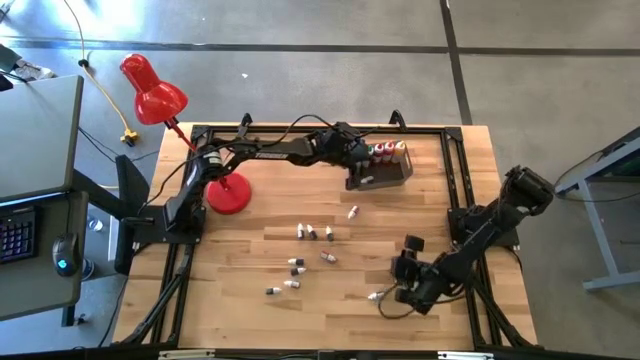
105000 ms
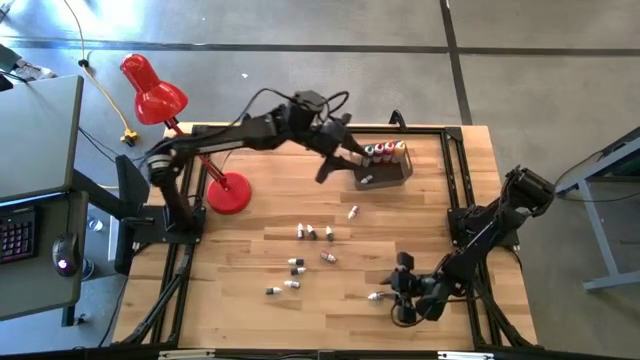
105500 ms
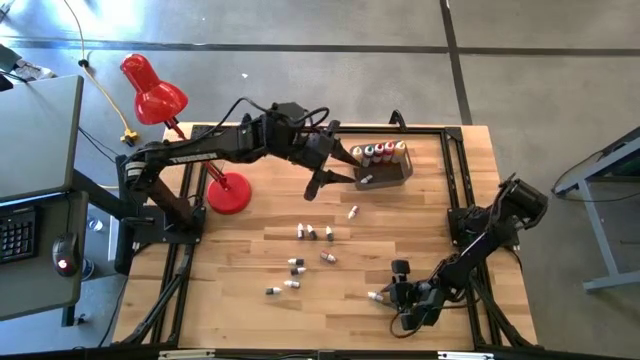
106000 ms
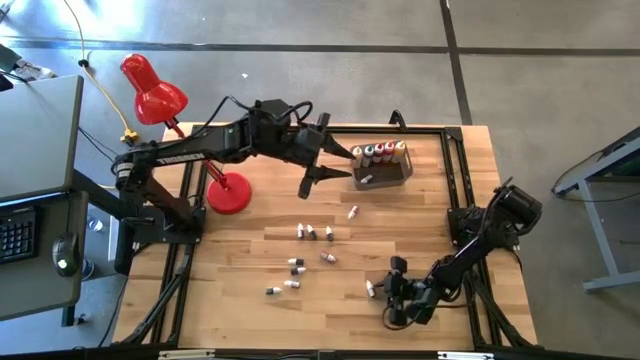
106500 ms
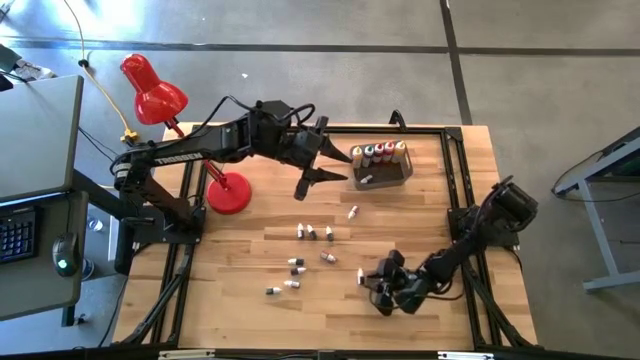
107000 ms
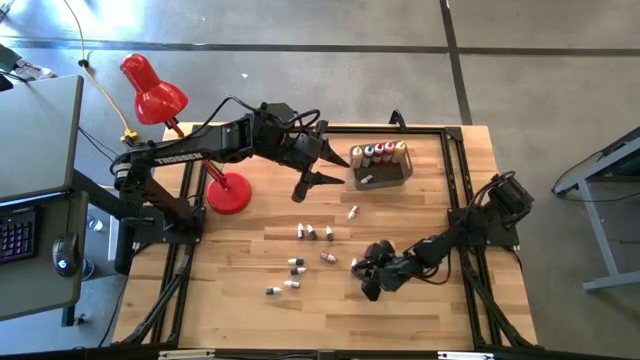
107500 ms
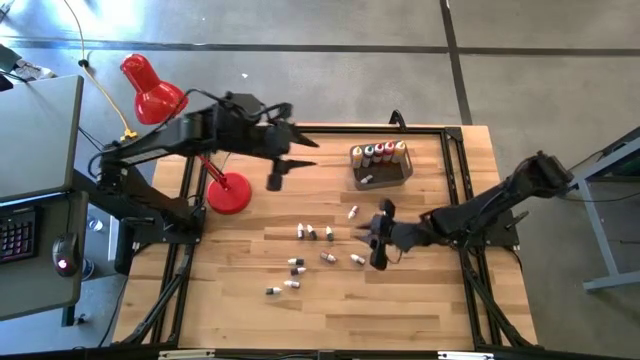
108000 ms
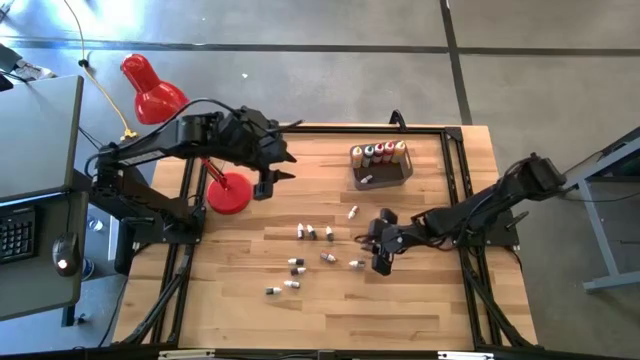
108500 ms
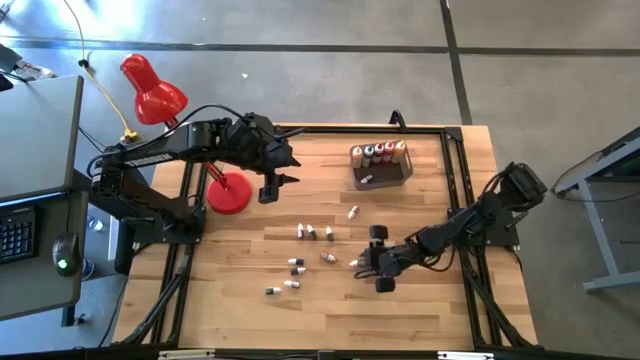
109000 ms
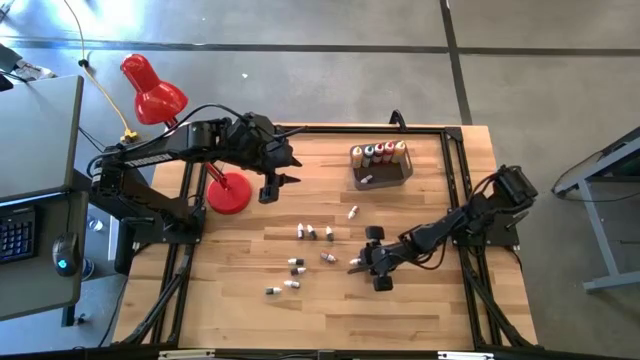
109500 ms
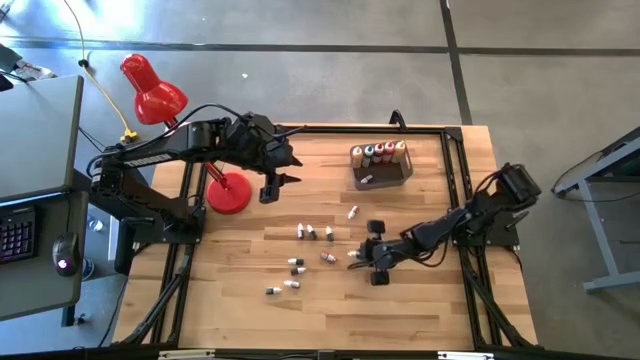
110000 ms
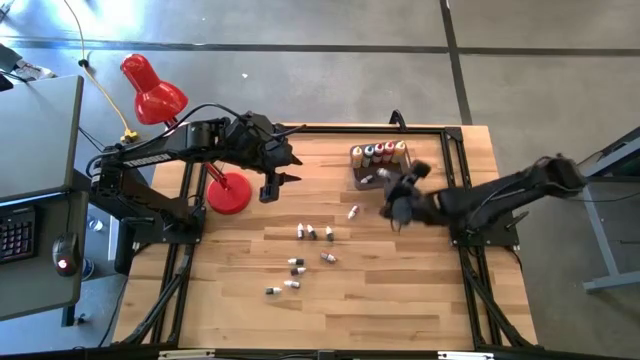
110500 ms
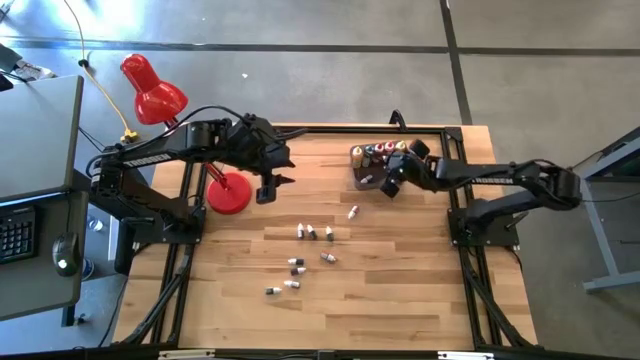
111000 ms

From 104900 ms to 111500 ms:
Task: Pick & Place food coloring
Put the small black food coloring bottle into the bin

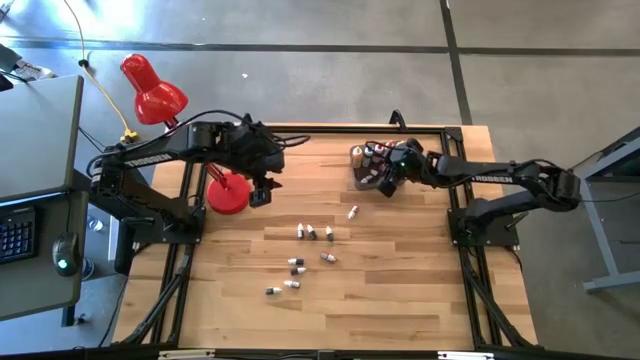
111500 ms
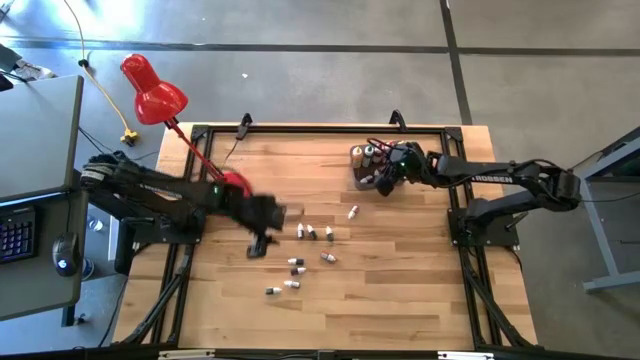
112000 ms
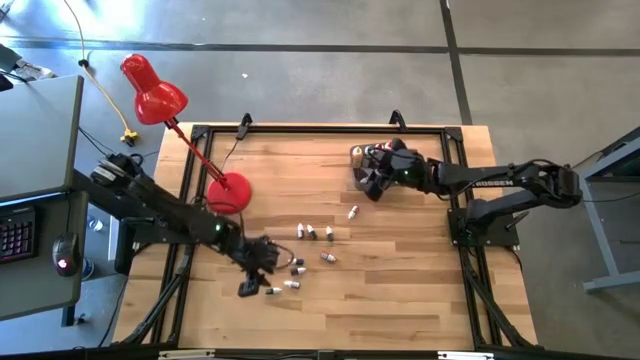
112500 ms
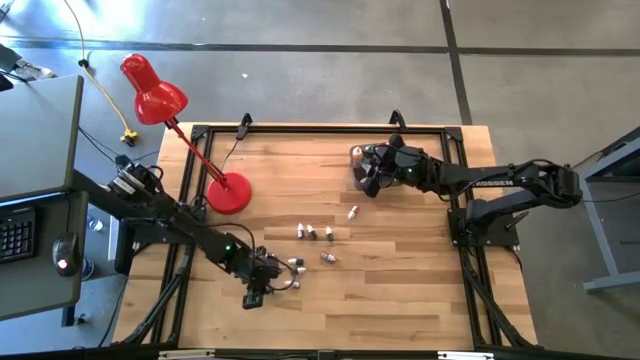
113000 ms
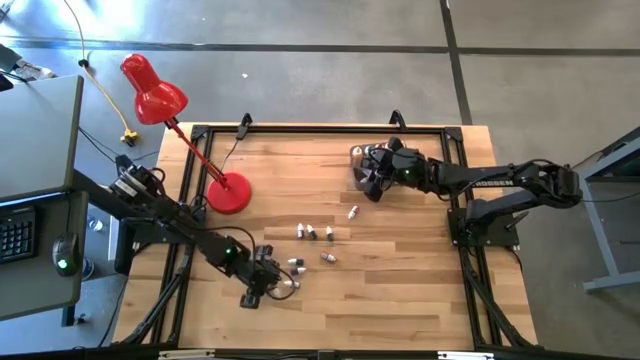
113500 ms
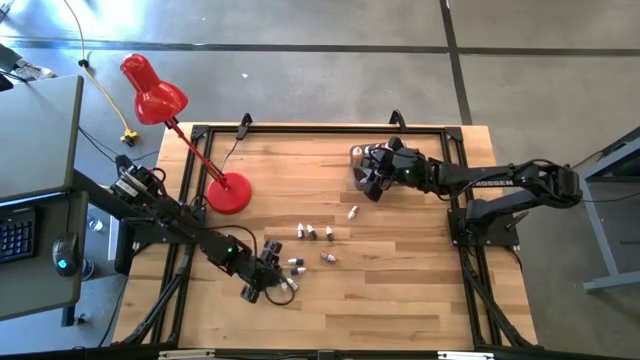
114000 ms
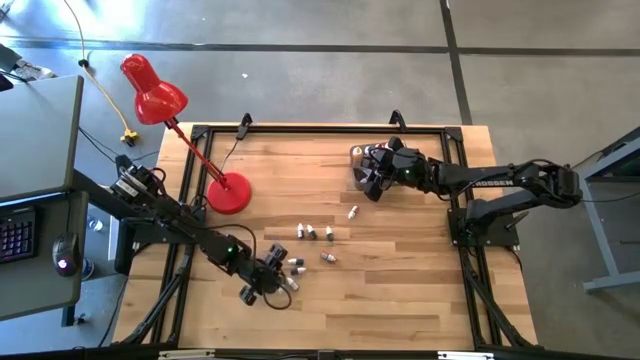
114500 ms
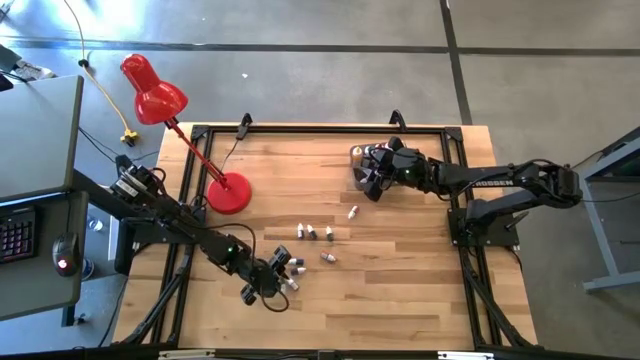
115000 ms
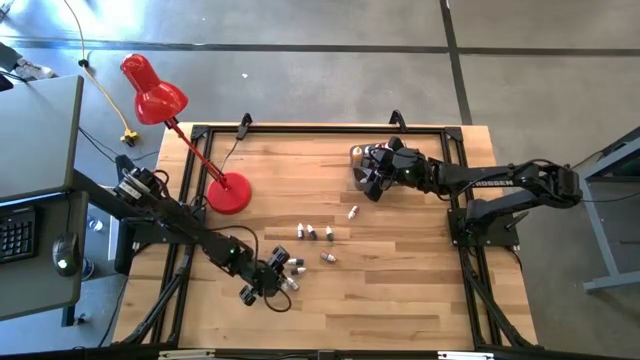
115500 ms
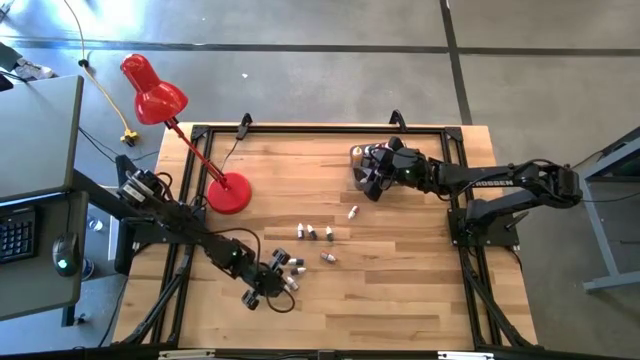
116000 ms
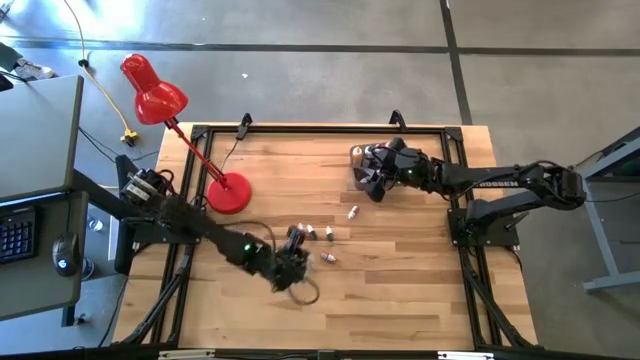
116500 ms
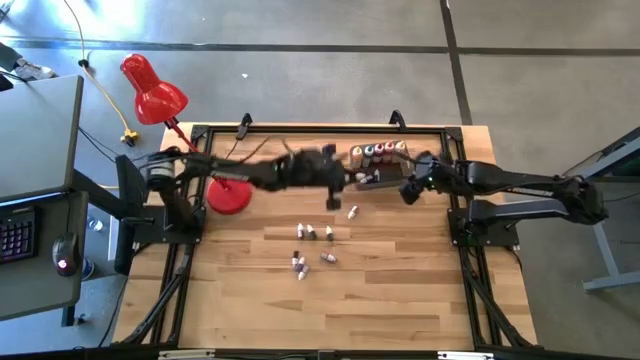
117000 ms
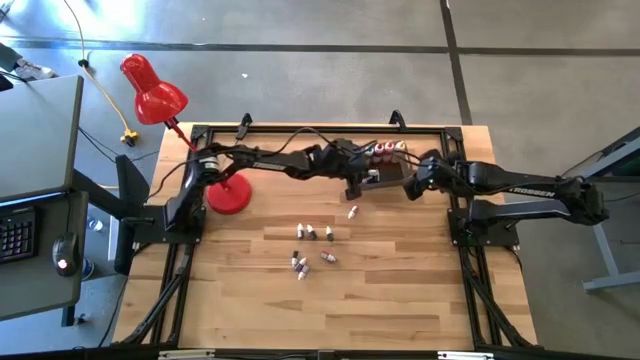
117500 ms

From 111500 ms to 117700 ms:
Put the bottom small green food coloring bottle into the bin

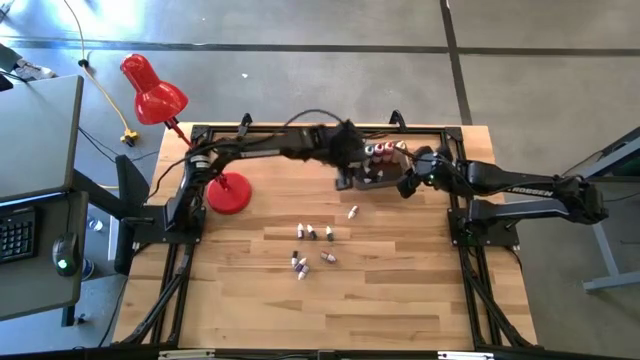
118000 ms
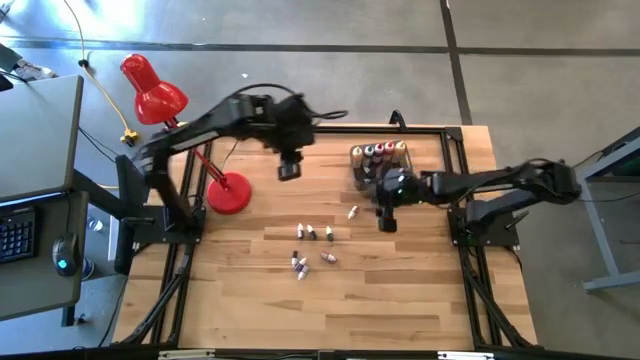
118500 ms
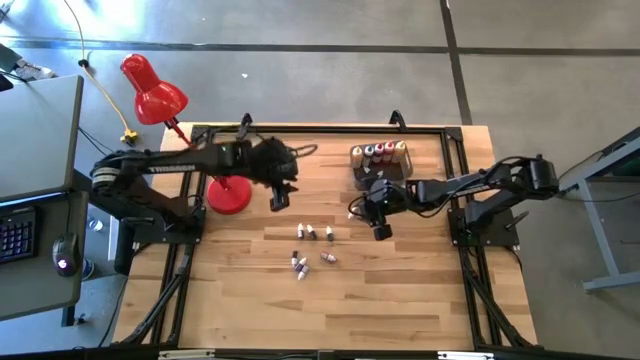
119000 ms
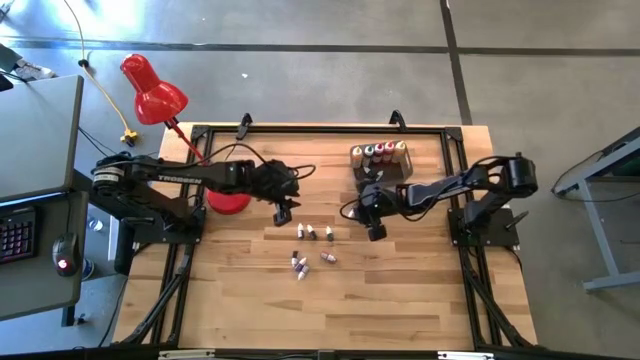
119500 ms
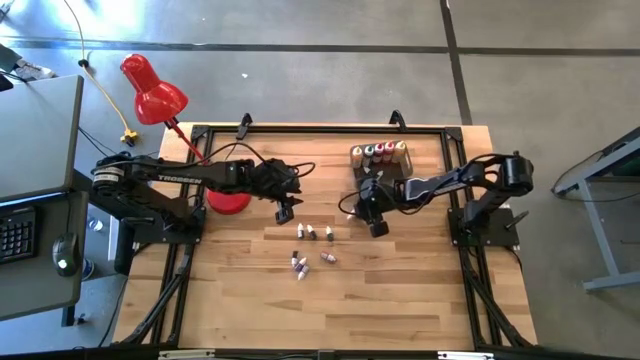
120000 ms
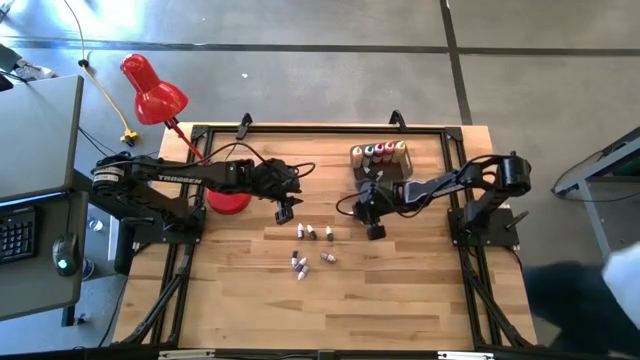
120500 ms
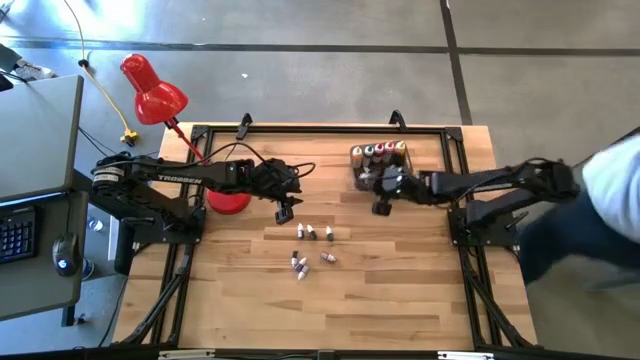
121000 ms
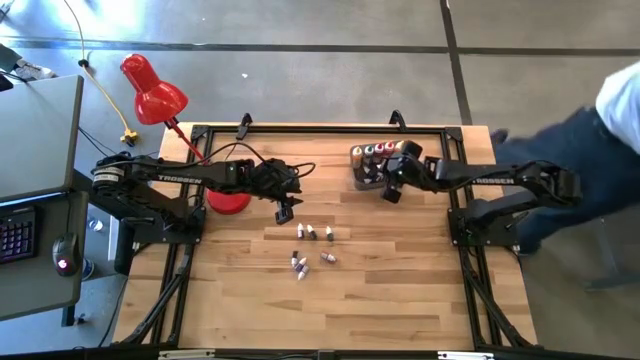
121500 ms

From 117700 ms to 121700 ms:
Put the small orange food coloring bottle into the bin

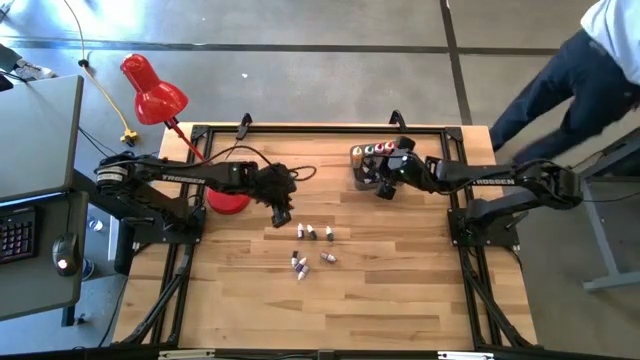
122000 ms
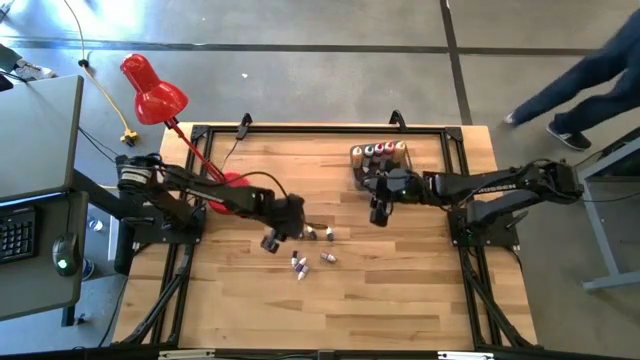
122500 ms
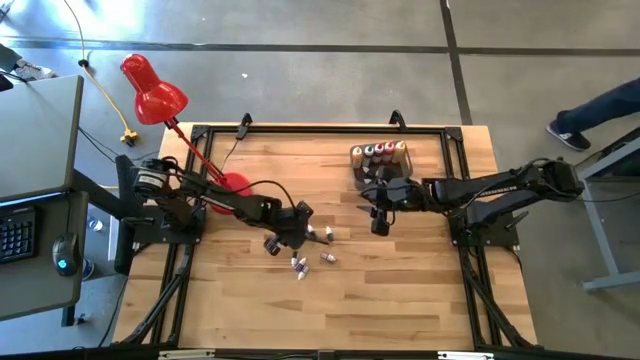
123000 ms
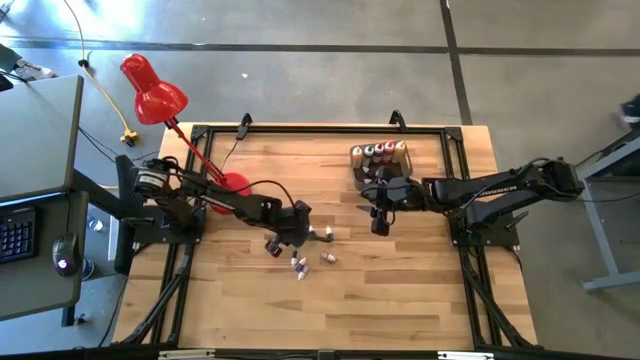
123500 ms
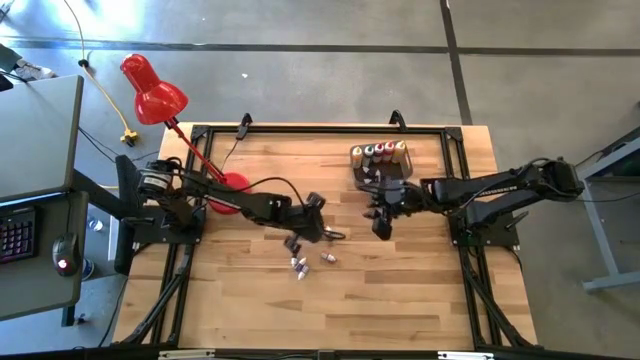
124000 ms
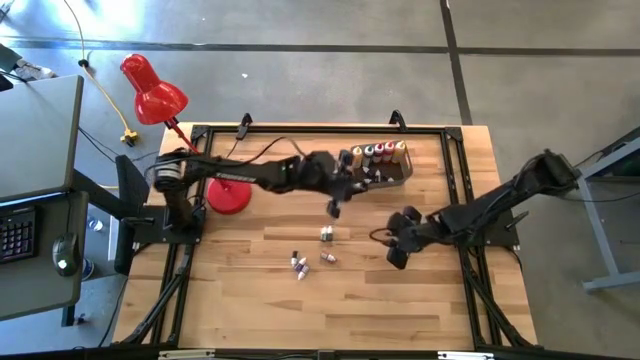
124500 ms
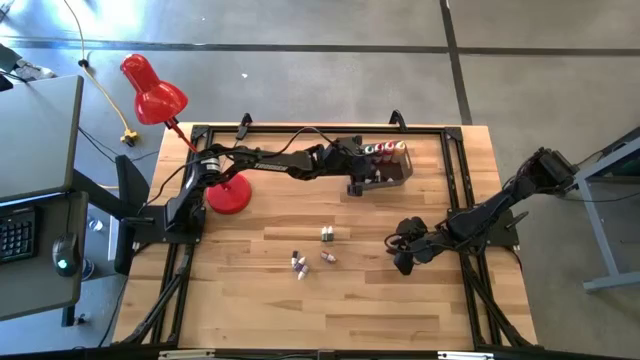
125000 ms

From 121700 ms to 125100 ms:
Put the top small red food coloring bottle into the bin

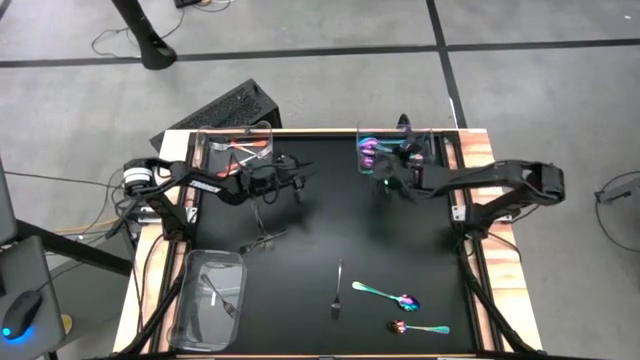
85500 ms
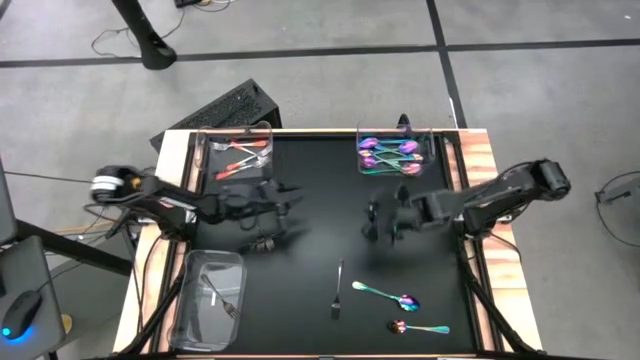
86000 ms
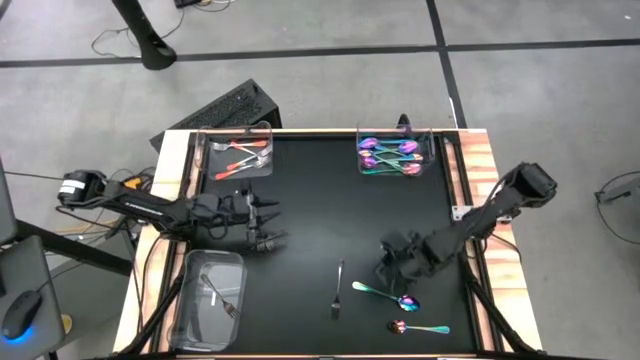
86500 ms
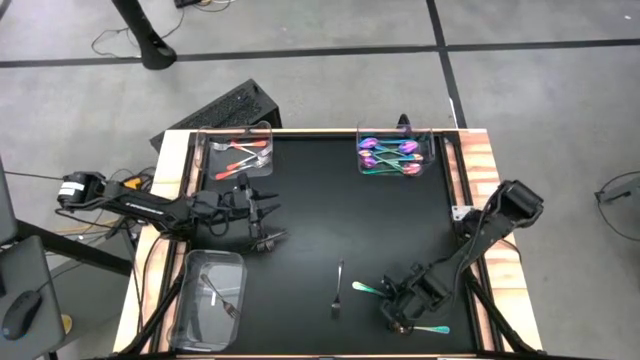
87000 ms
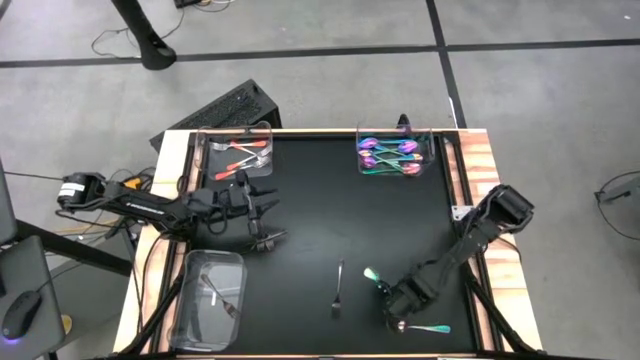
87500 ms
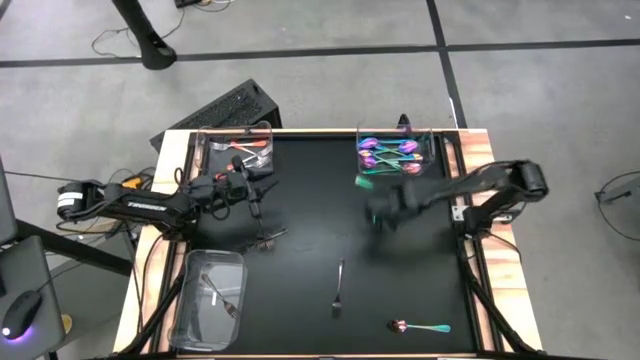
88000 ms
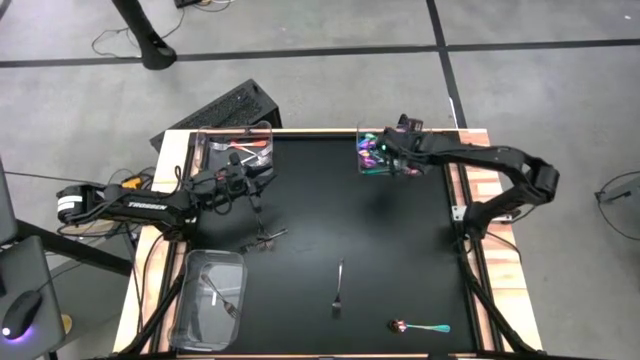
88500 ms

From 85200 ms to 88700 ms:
Task: Sort silverware by color (type)
Put the blue spoon into top right transparent bin
